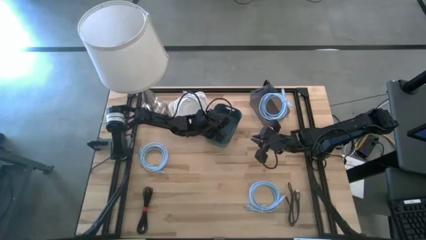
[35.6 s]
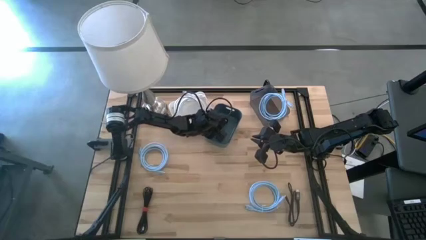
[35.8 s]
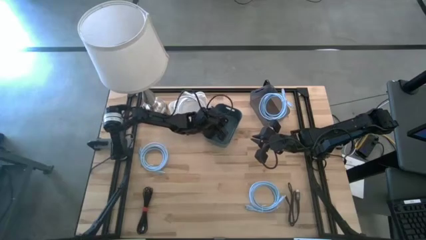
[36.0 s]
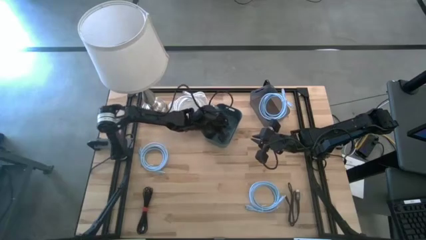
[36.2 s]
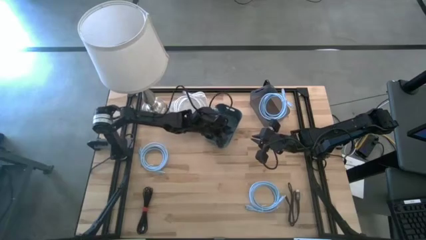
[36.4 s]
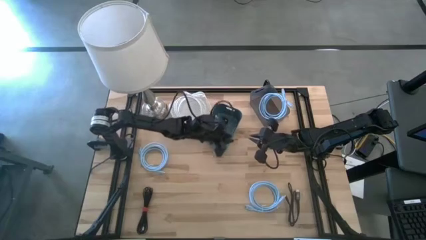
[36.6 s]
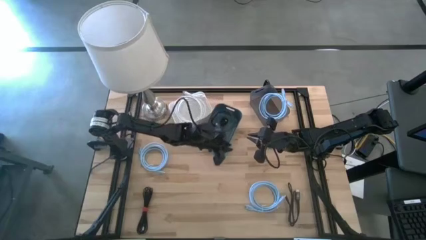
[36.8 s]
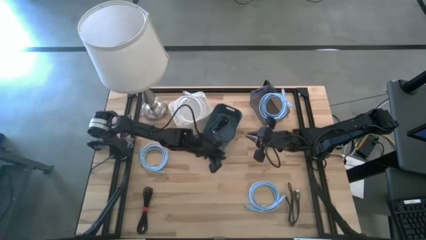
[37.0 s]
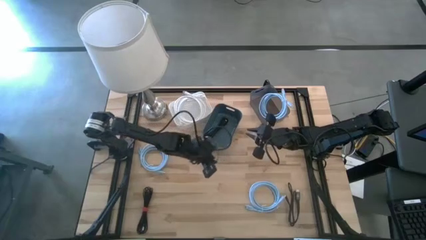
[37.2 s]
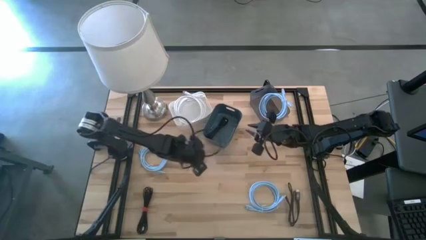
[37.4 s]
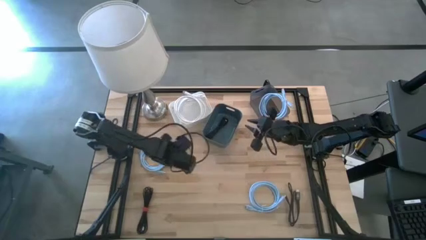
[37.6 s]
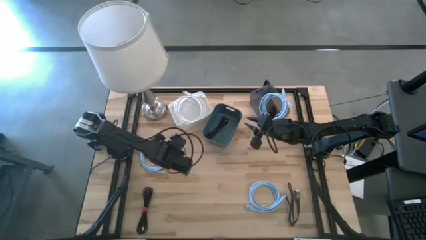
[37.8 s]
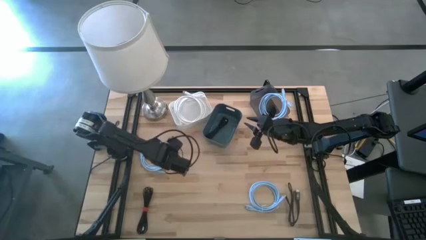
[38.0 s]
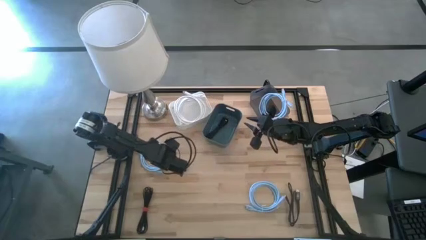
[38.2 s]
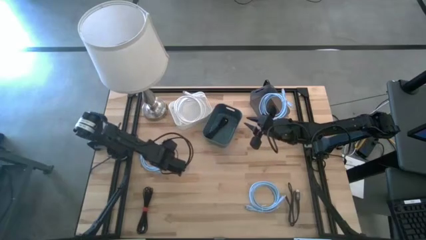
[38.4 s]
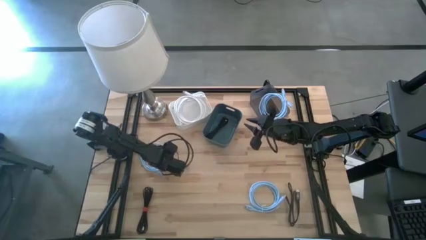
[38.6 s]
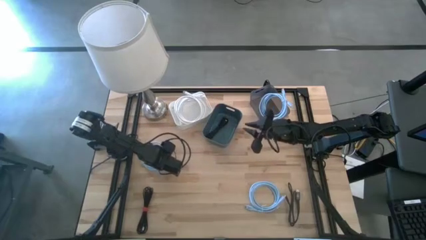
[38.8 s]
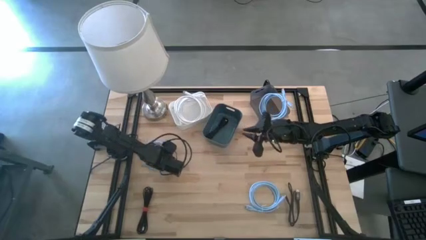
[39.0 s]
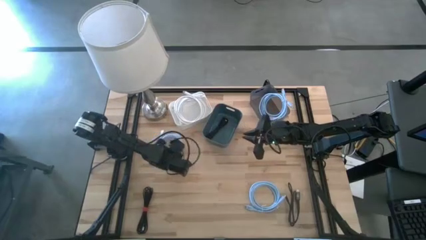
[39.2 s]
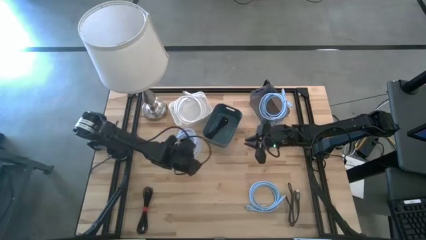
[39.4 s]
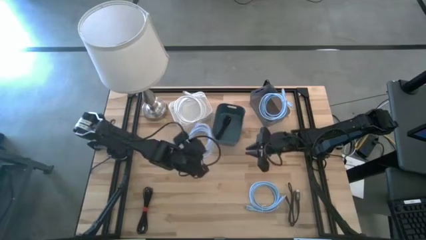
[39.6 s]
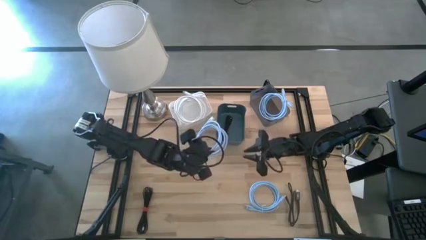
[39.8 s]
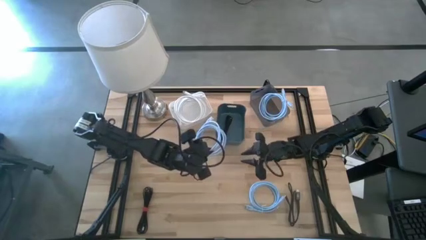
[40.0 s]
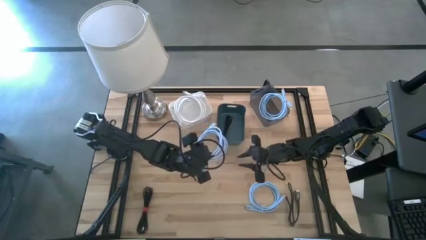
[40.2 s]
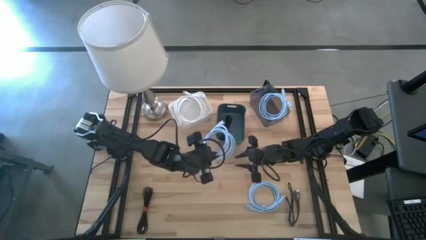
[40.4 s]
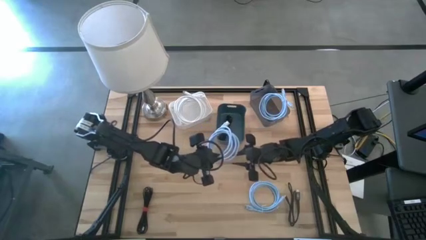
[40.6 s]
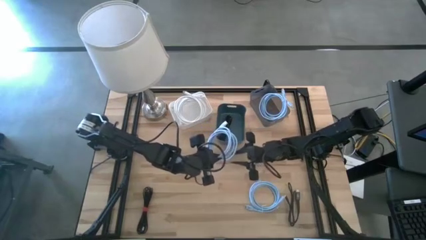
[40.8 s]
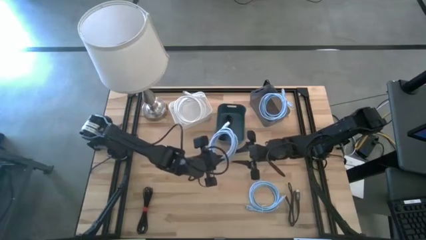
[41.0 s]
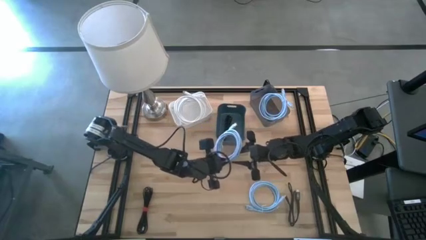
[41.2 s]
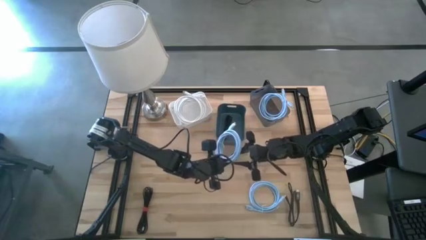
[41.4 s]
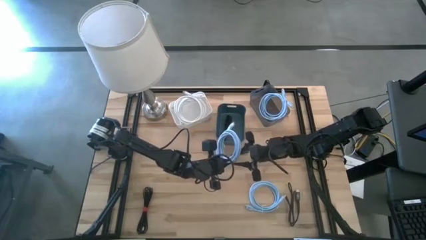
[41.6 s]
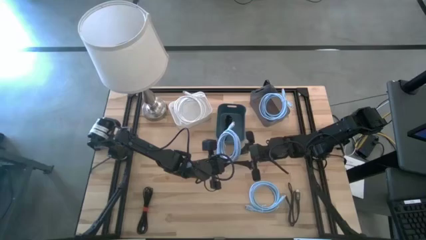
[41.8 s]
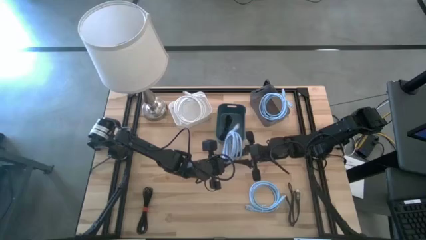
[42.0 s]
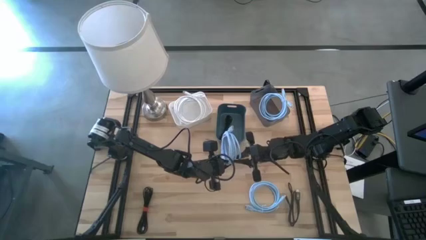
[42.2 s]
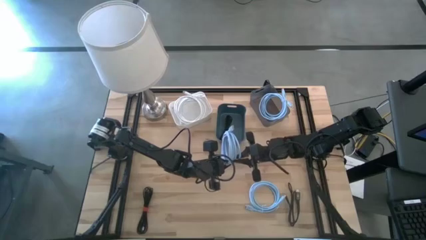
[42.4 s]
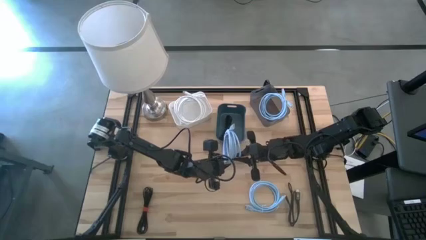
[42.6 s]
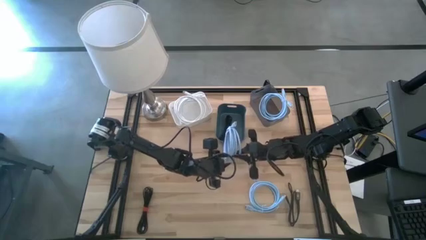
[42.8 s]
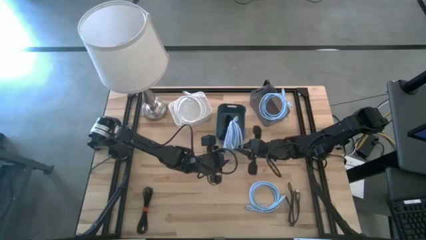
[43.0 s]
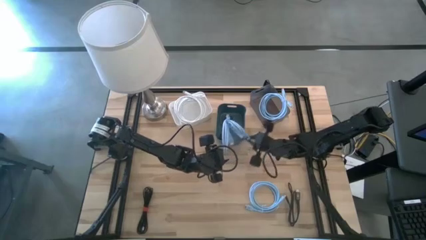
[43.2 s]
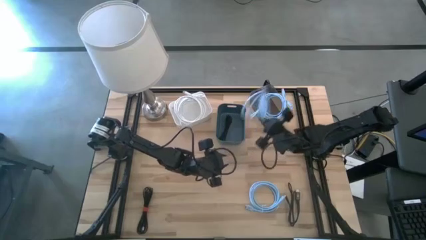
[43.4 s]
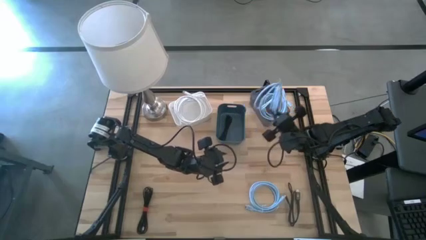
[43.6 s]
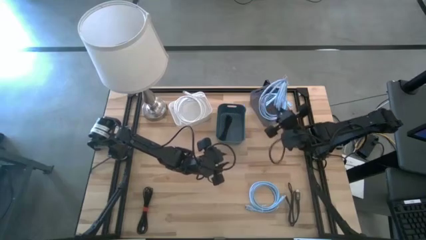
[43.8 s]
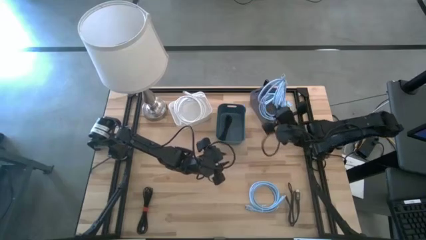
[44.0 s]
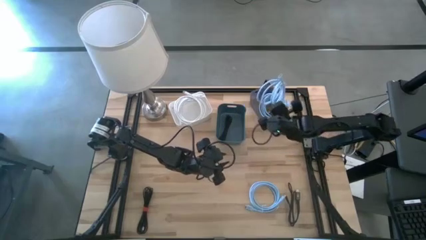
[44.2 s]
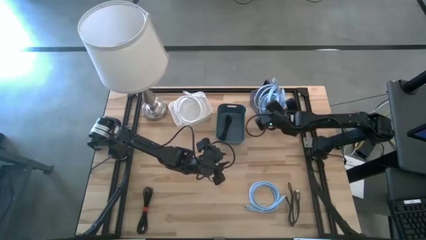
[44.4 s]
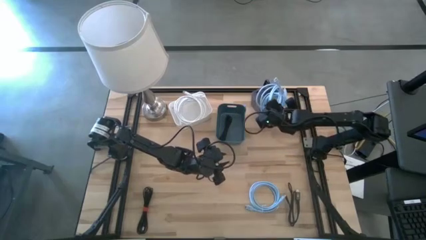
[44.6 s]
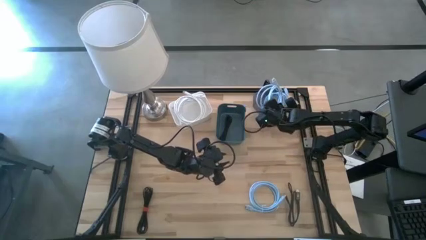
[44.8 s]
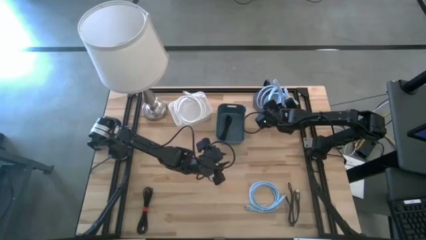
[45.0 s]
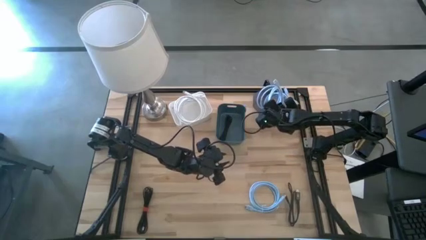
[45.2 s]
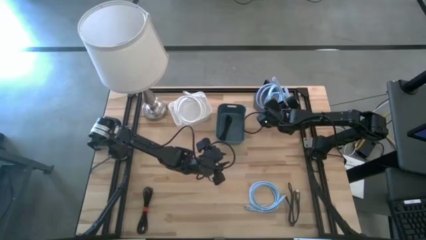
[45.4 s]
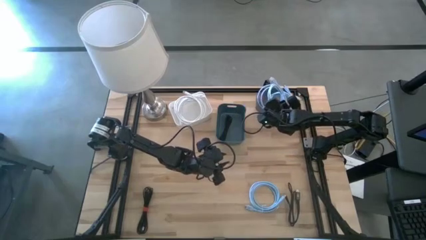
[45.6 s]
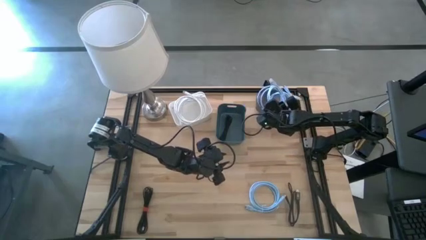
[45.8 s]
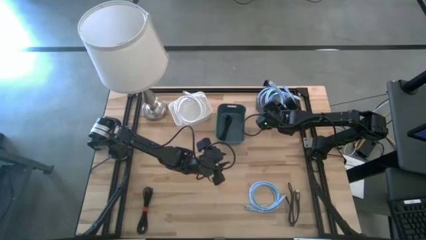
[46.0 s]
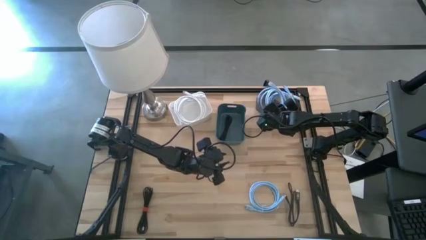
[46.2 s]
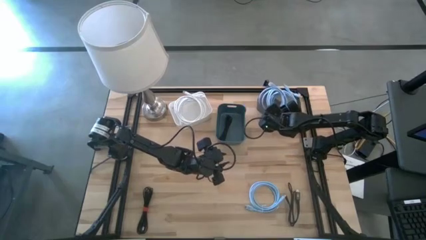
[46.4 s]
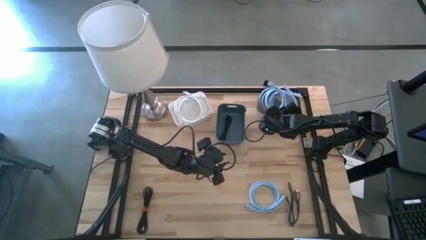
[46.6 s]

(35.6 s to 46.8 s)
Task: Sort HDMI cables
Put the left blue HDMI cable into the black bin

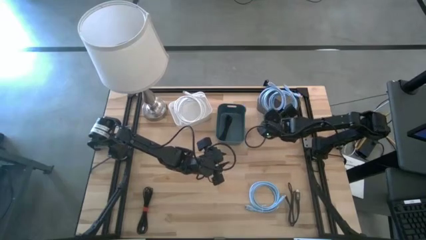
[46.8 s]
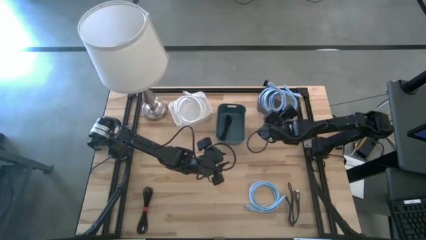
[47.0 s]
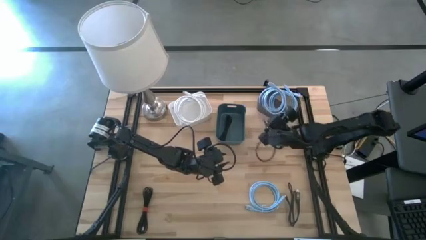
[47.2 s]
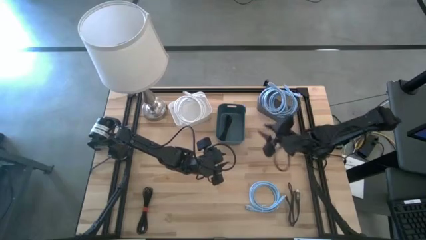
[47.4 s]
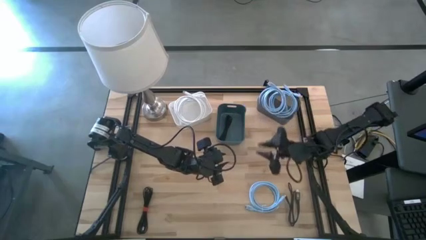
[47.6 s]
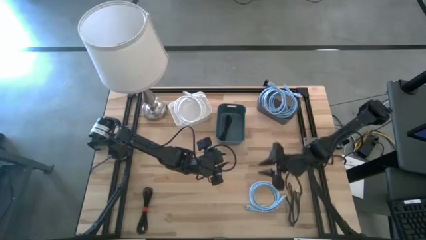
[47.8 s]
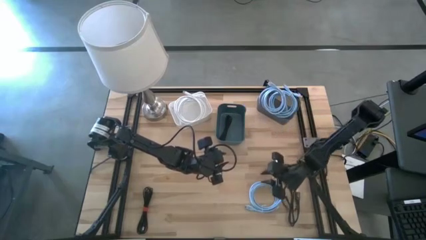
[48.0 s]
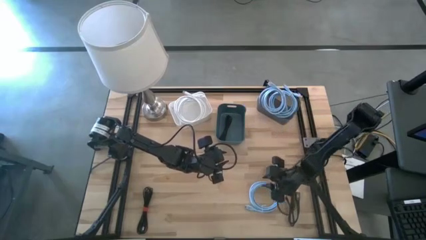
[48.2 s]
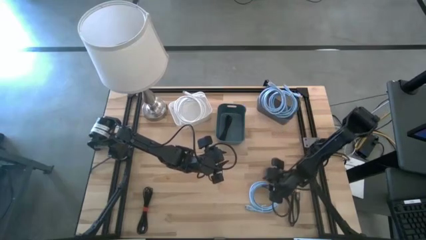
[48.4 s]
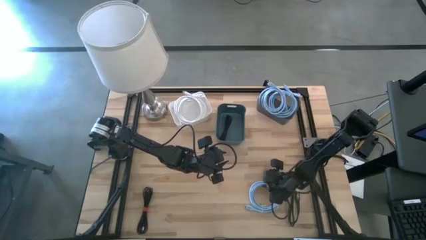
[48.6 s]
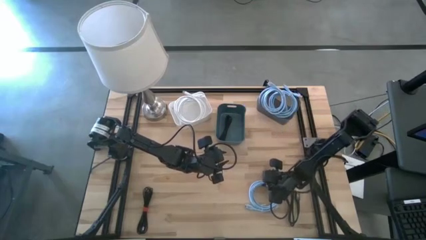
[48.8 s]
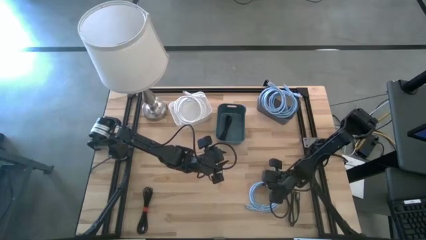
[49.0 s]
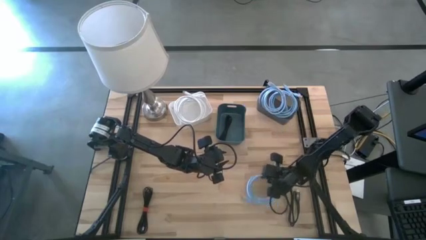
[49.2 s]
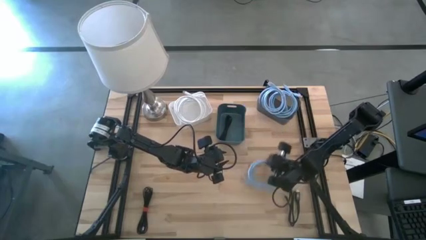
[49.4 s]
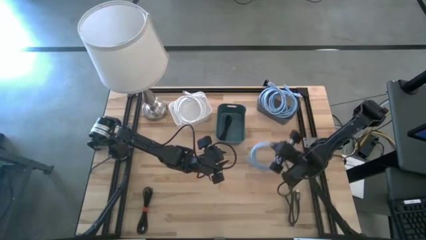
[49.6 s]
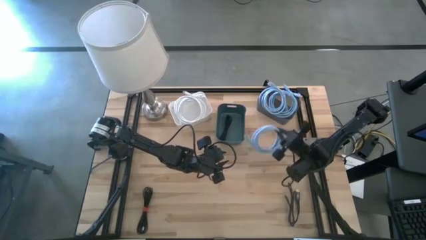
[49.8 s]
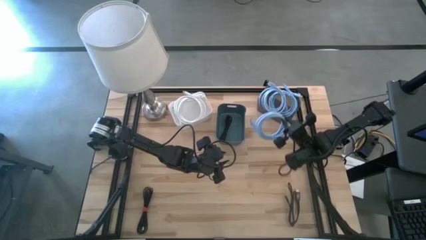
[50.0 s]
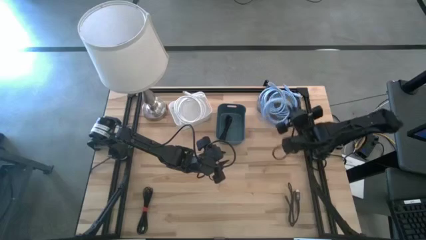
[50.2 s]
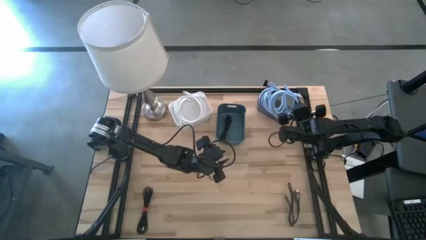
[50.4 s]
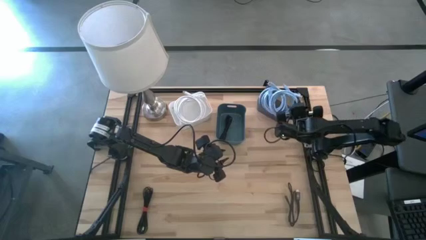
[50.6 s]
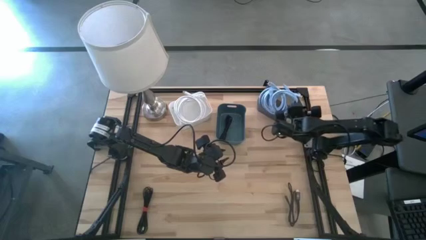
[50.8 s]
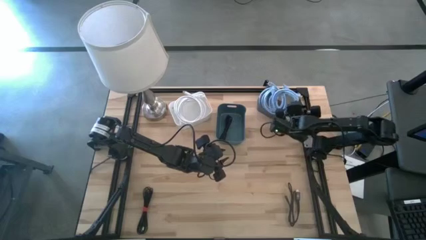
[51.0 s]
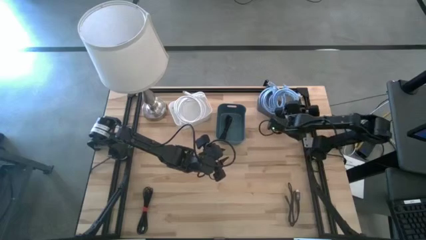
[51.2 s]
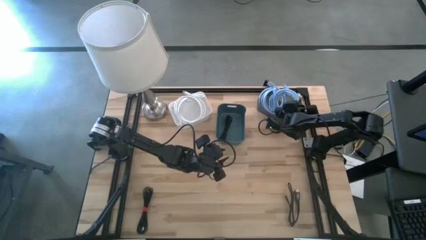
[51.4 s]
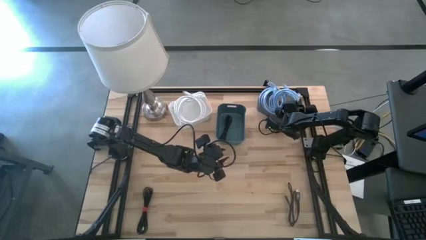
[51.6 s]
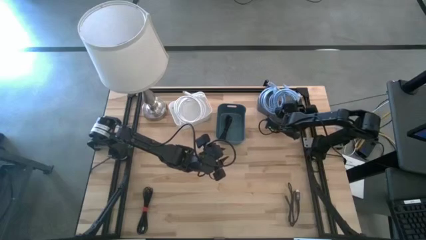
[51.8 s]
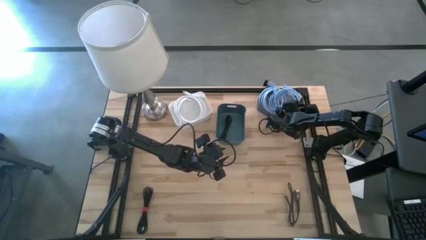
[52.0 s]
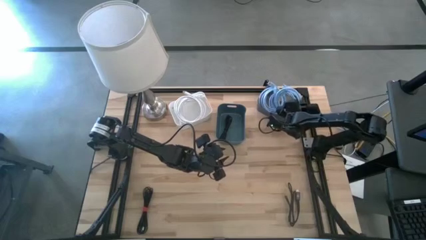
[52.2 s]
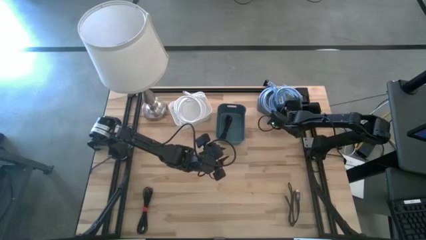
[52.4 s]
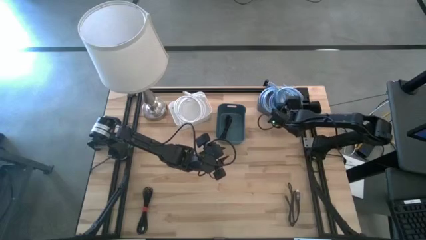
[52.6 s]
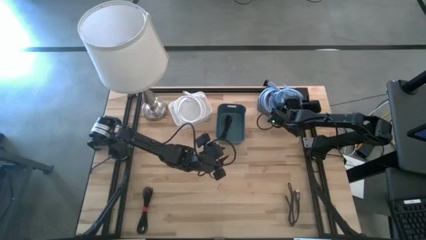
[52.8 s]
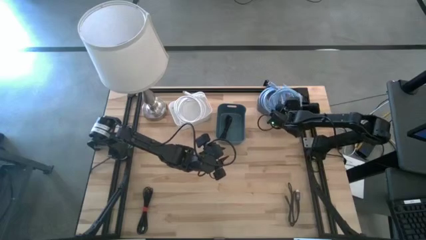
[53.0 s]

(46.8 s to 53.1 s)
Put the blue HDMI cable into the black bin
